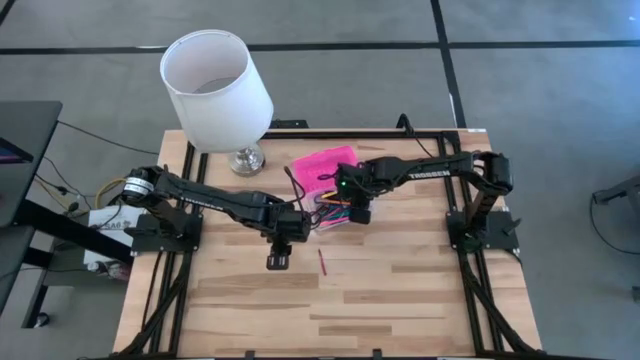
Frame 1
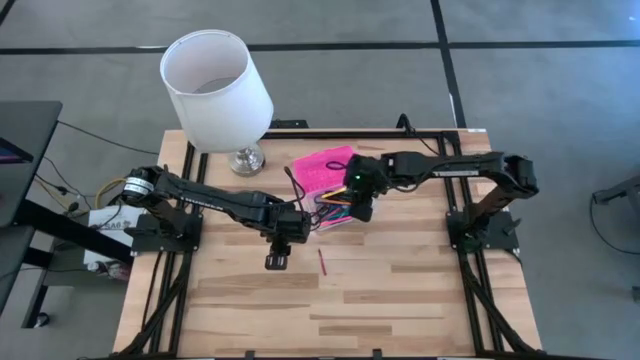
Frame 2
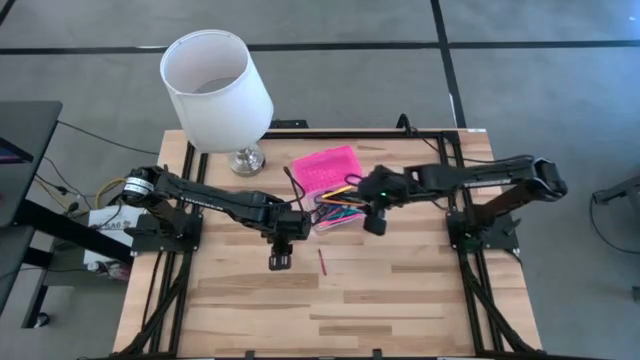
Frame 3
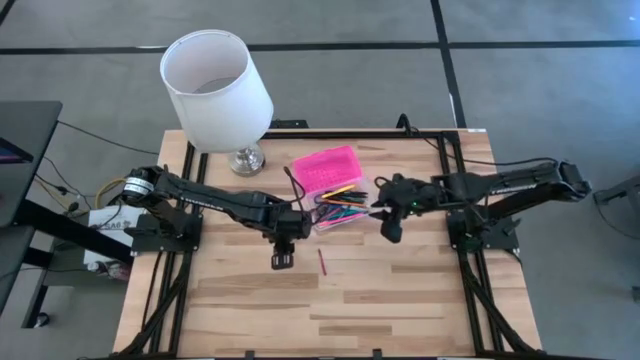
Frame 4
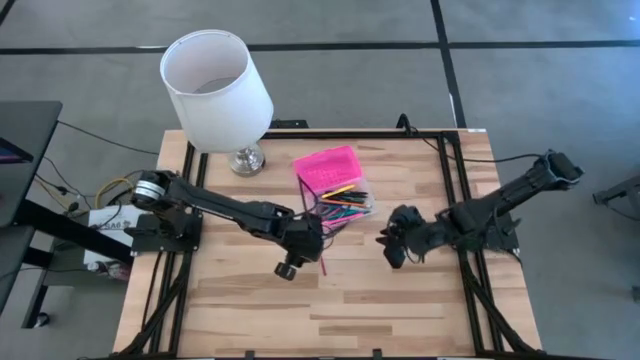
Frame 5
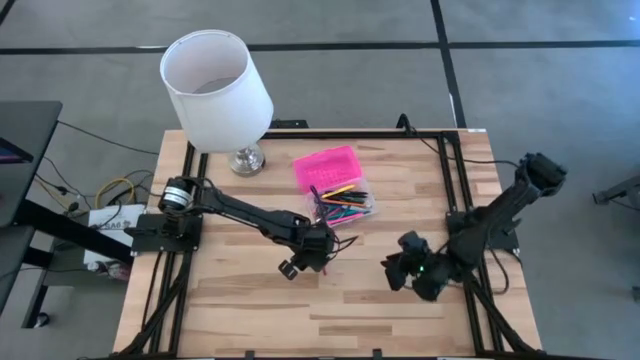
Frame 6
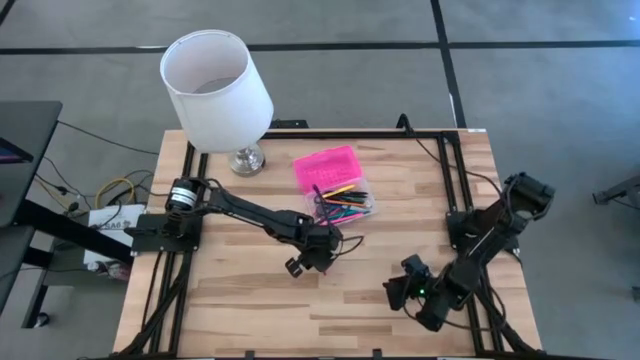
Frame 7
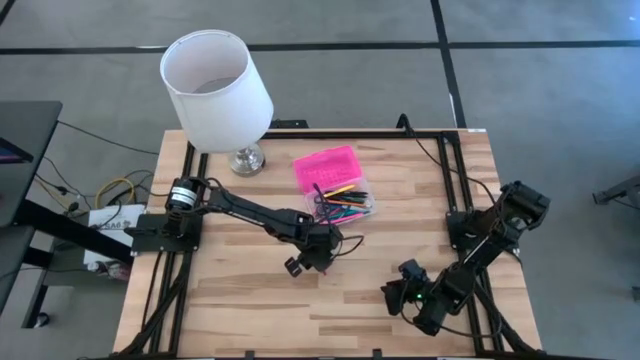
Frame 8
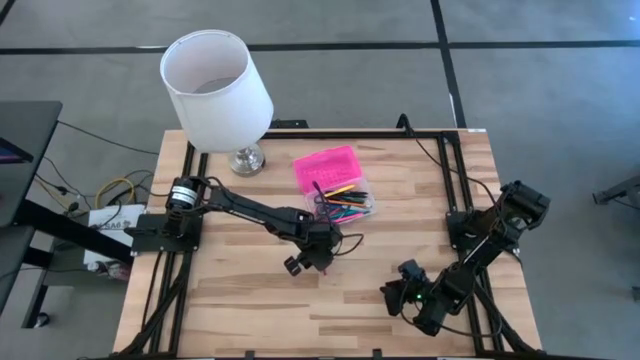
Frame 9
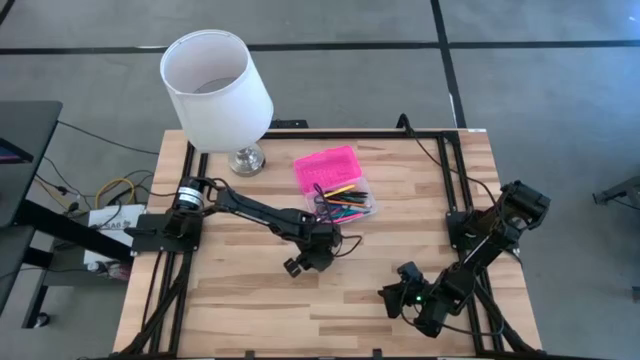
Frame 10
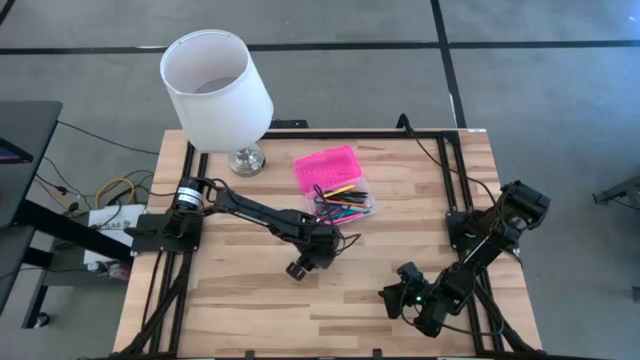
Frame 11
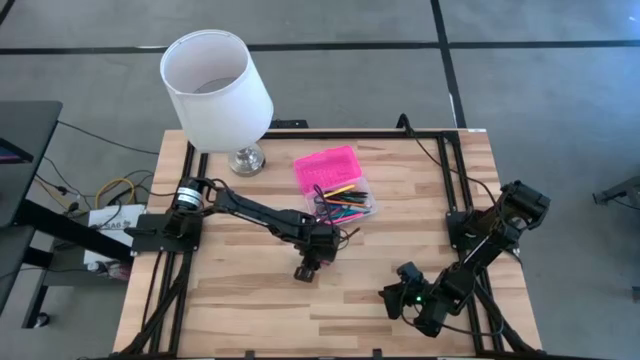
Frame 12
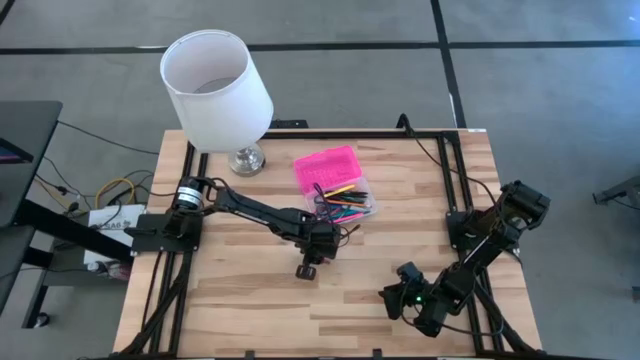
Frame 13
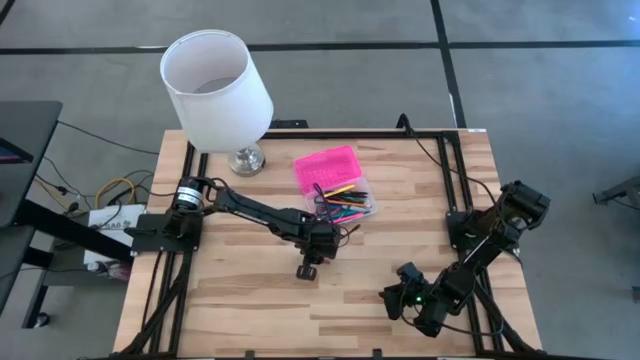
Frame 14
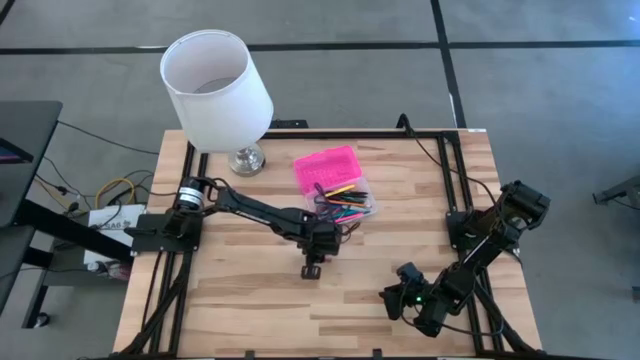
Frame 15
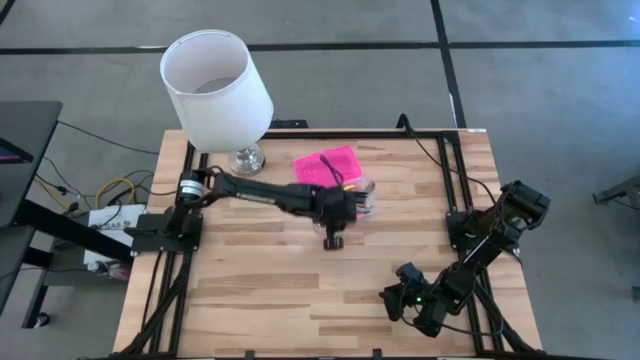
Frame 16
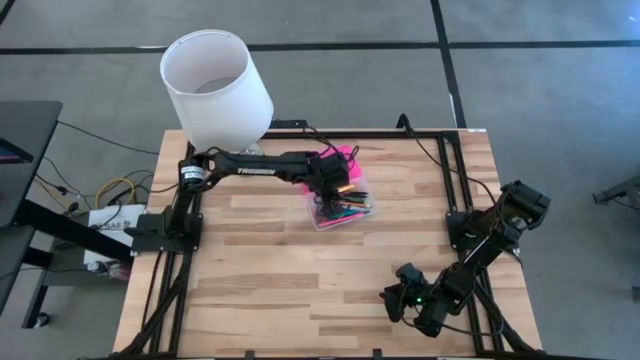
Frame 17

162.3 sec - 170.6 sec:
Task: Pick & place school supplies into a supply box
Put the red crayon into the pink supply box

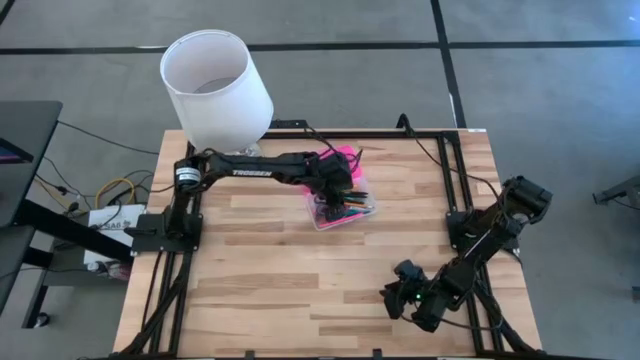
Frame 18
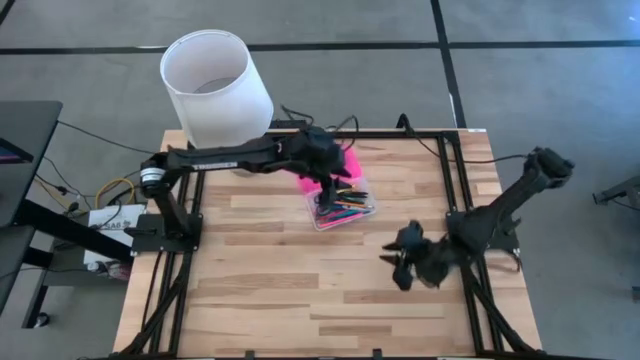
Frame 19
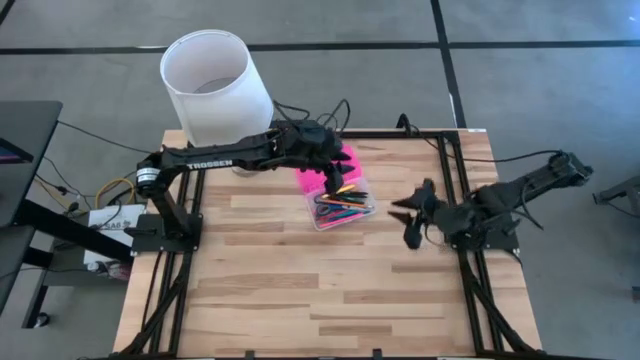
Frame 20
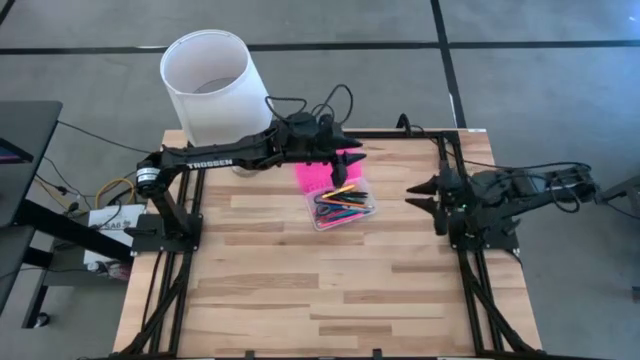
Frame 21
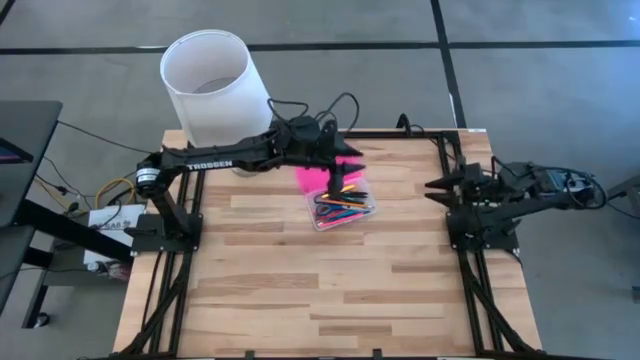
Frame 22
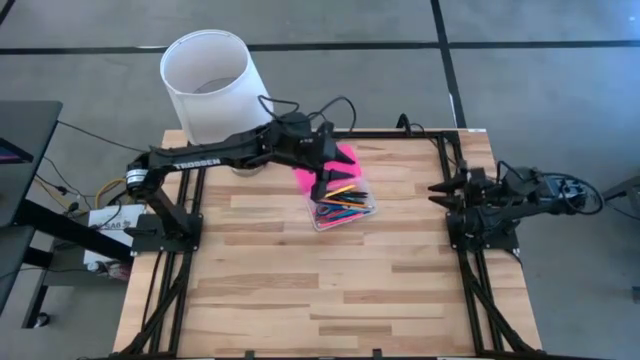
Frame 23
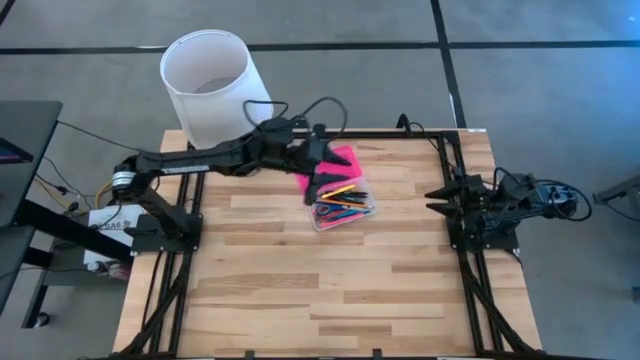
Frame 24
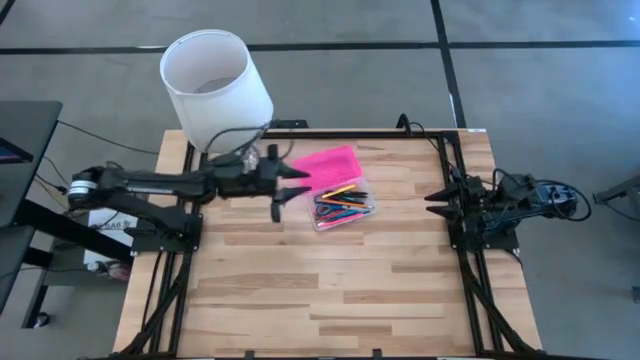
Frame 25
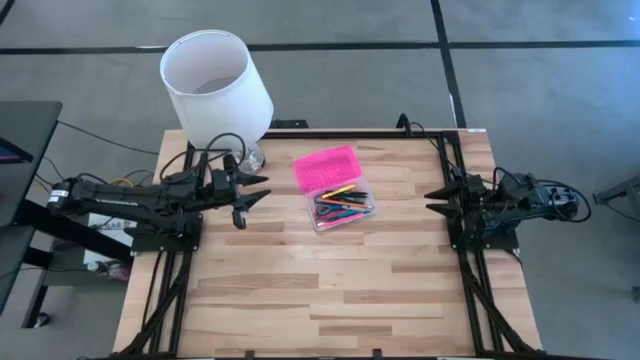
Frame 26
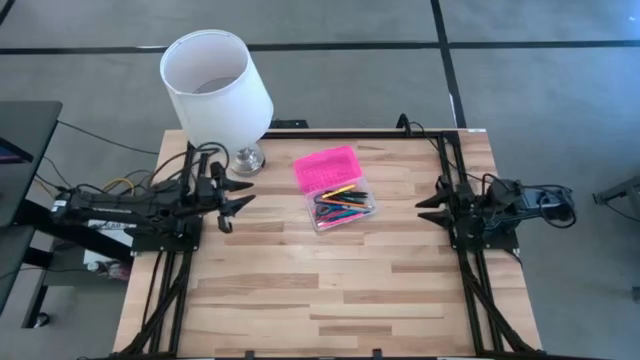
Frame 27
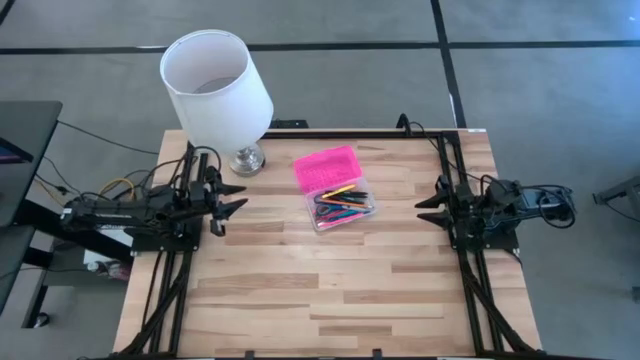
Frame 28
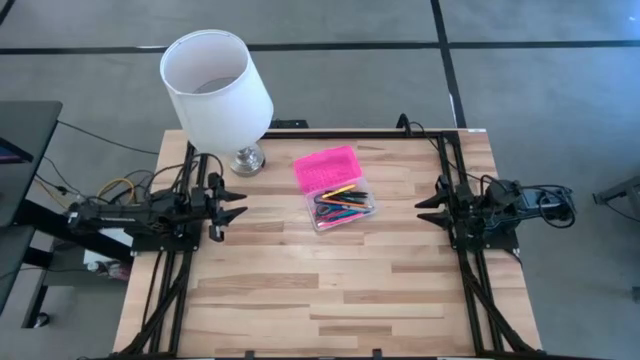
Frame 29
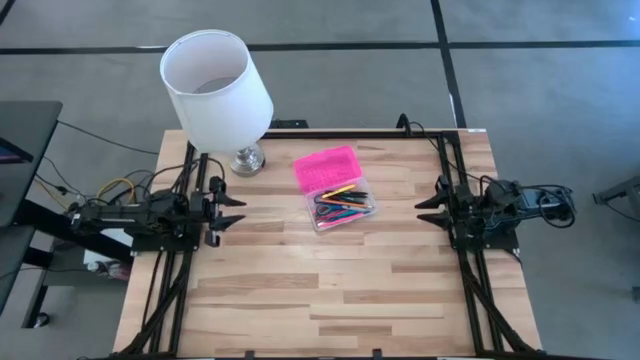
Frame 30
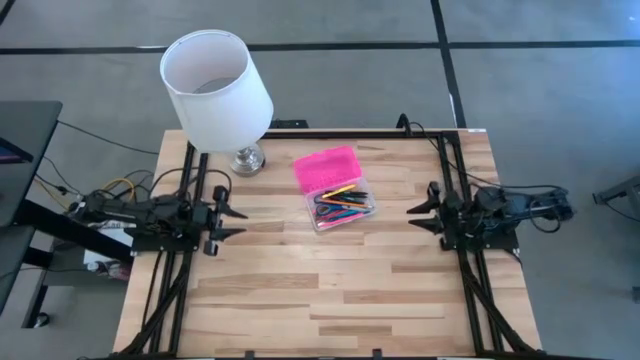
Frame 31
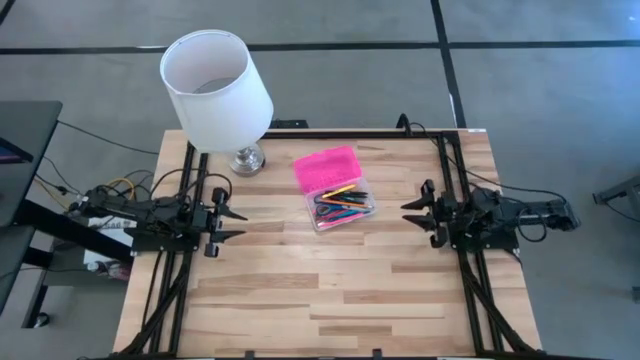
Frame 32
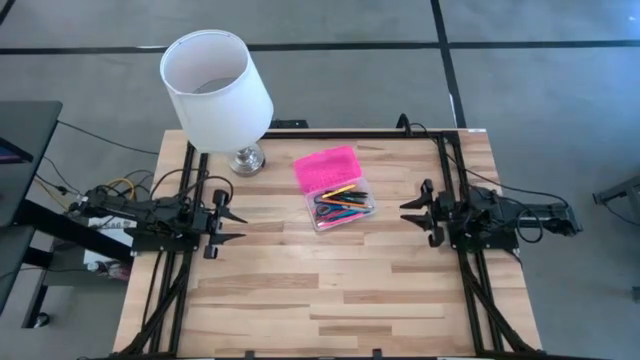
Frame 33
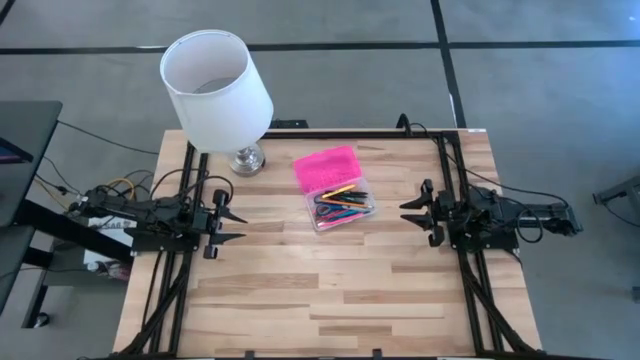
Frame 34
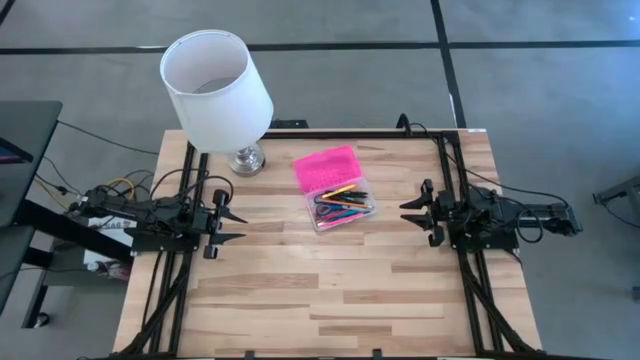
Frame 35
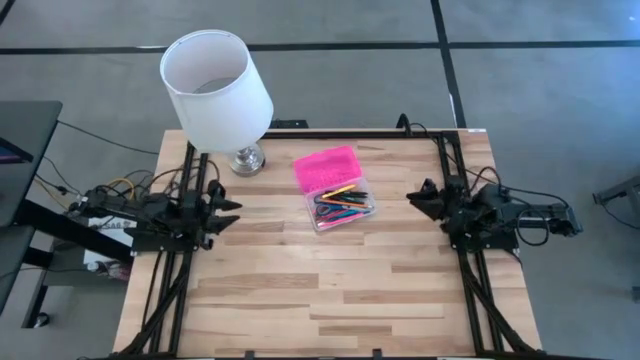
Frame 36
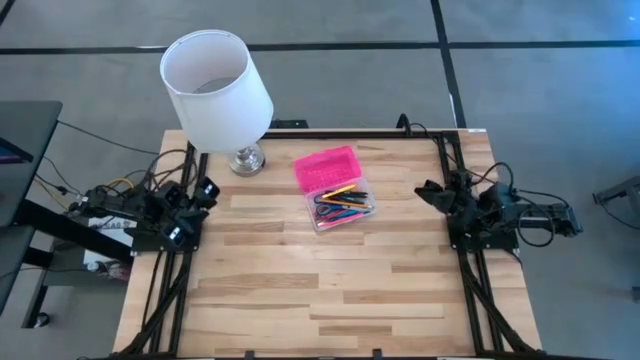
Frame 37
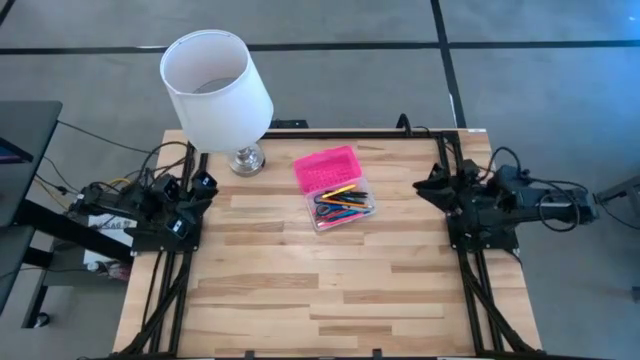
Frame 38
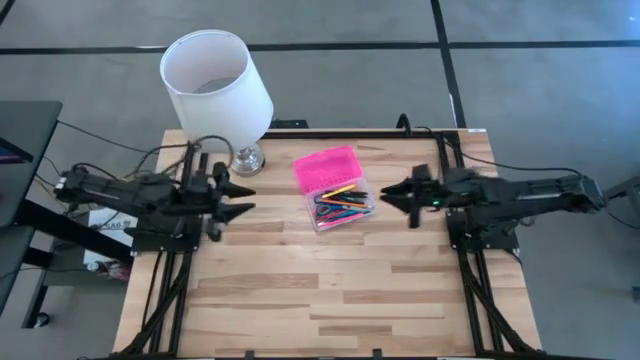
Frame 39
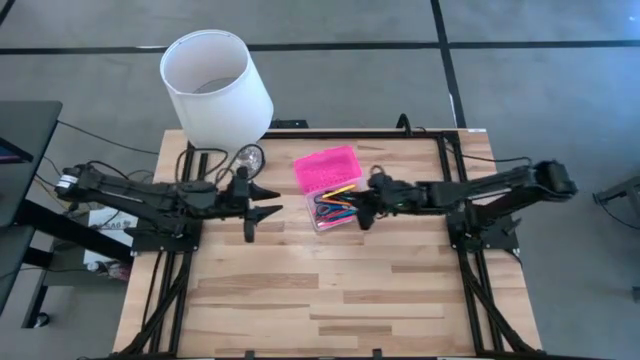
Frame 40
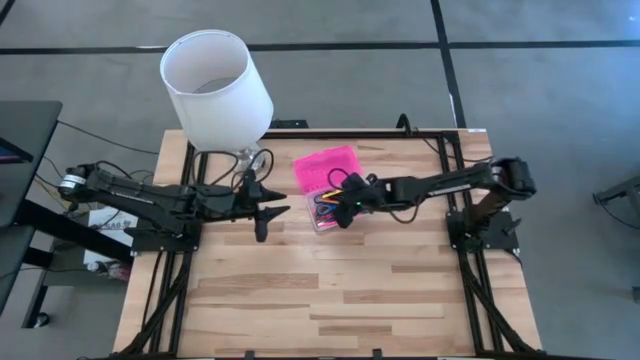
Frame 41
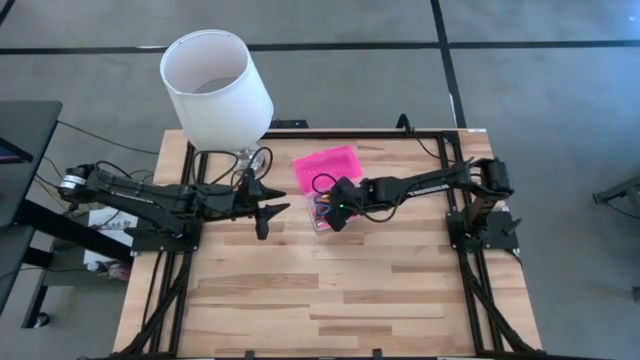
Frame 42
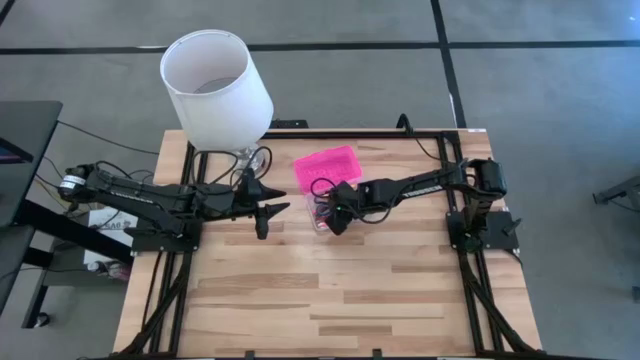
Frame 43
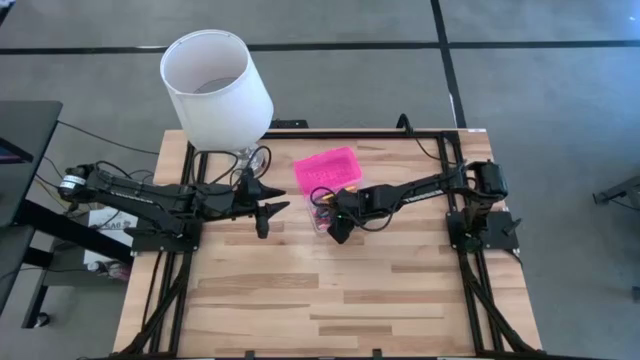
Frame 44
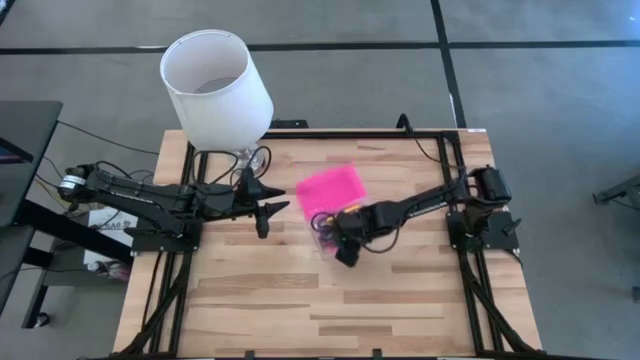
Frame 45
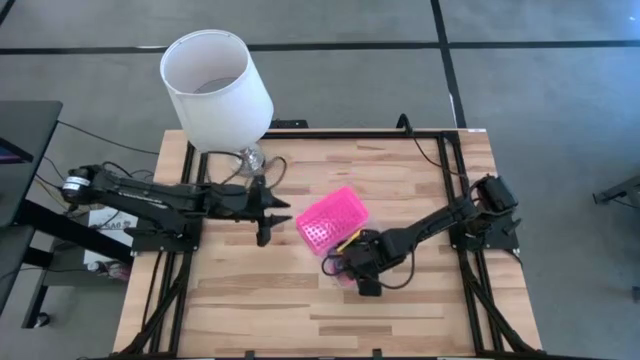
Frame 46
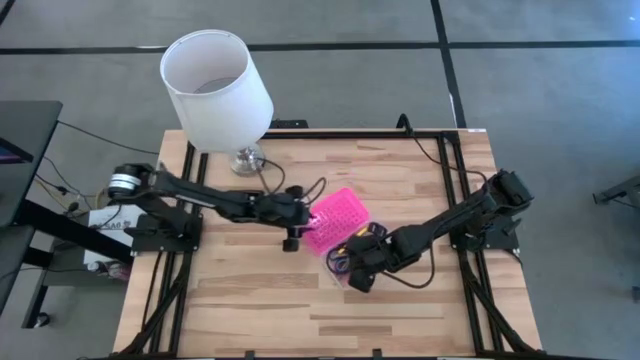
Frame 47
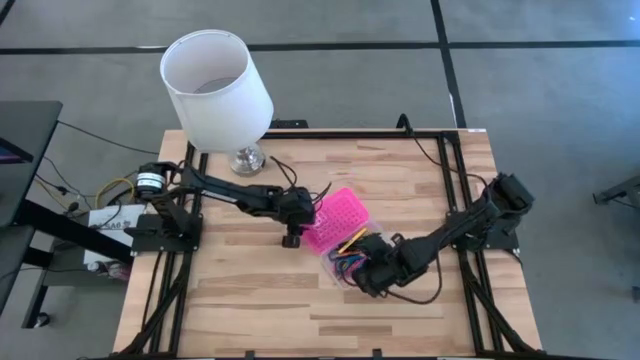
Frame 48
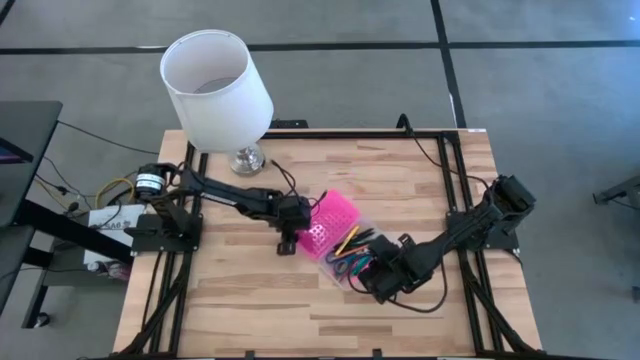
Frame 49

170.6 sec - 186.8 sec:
Close the pink supply box
